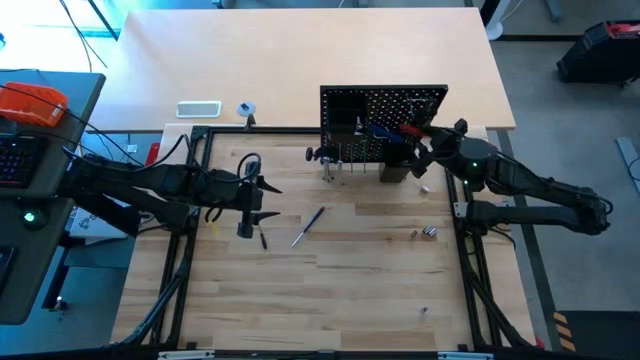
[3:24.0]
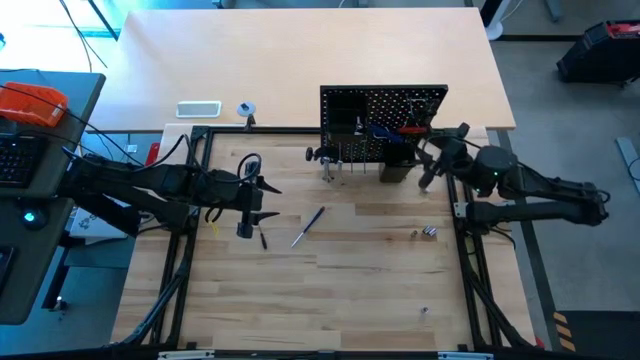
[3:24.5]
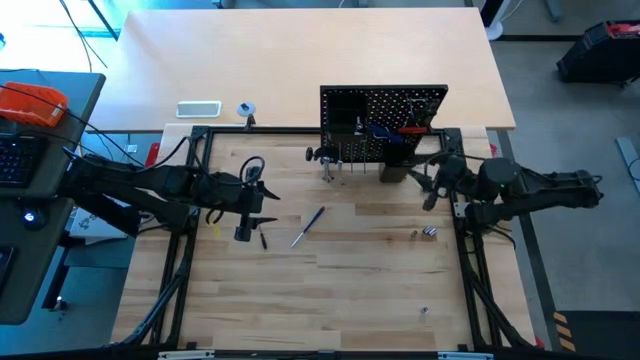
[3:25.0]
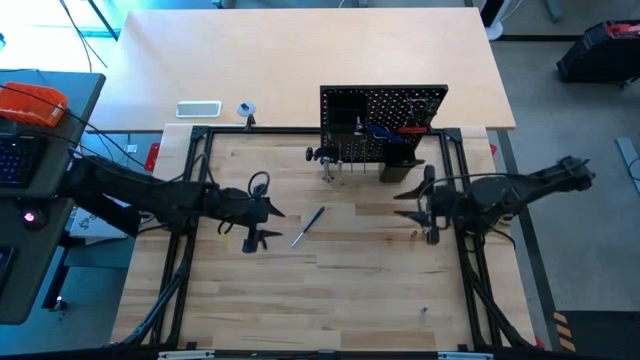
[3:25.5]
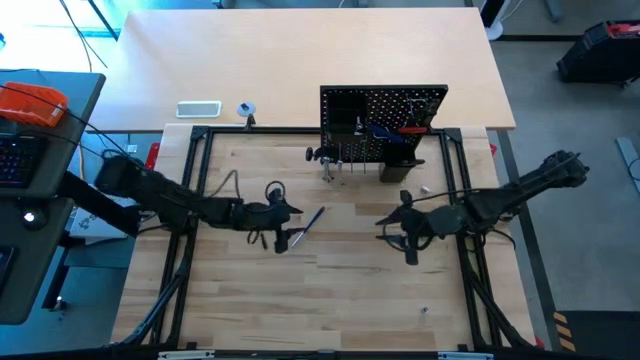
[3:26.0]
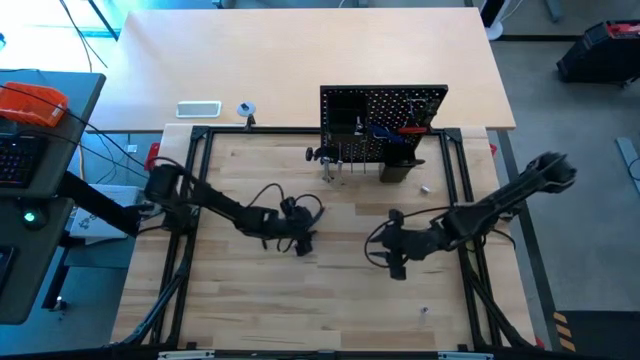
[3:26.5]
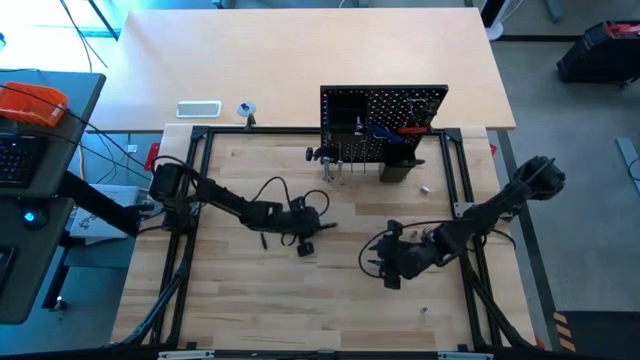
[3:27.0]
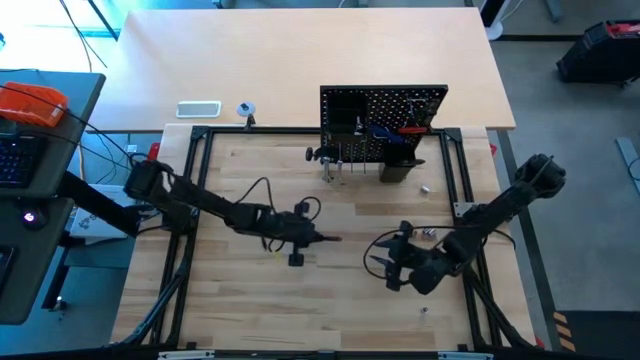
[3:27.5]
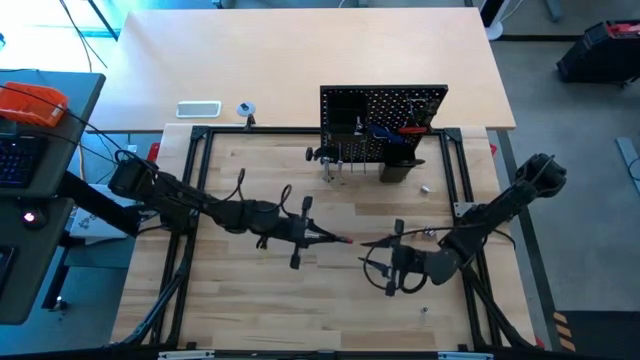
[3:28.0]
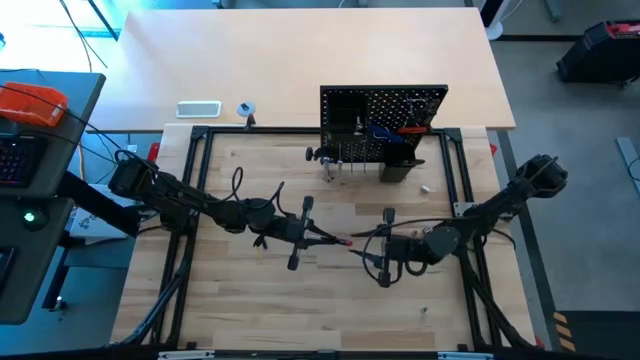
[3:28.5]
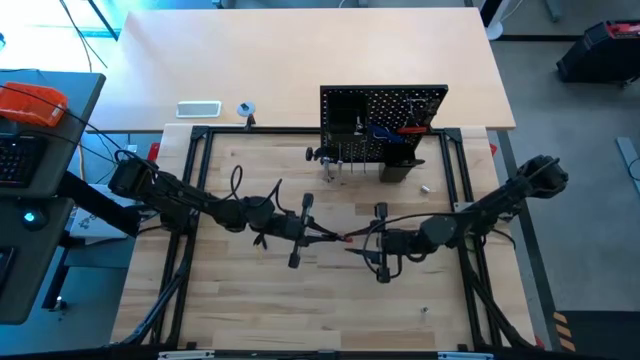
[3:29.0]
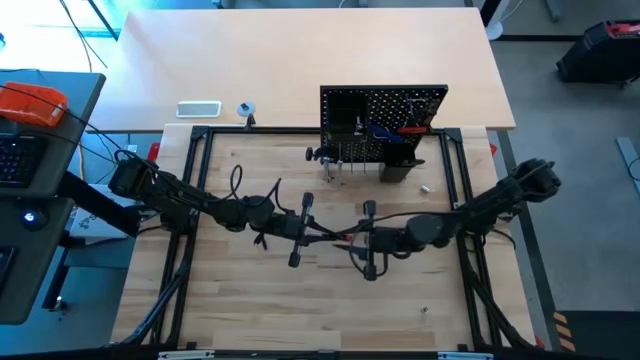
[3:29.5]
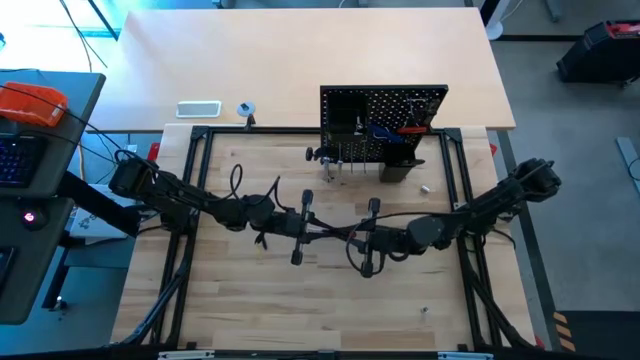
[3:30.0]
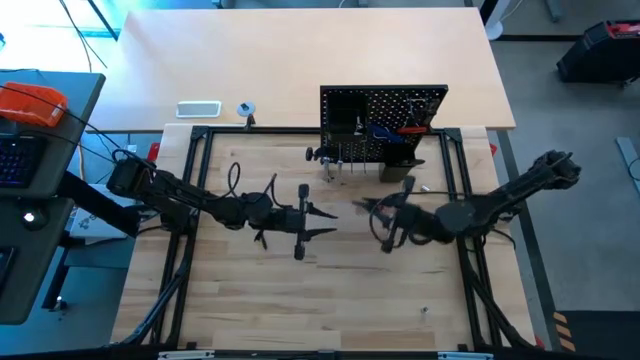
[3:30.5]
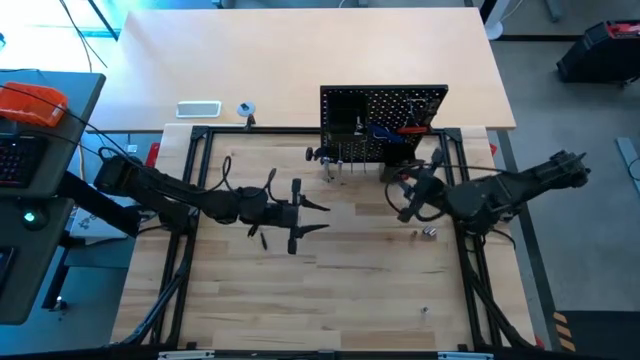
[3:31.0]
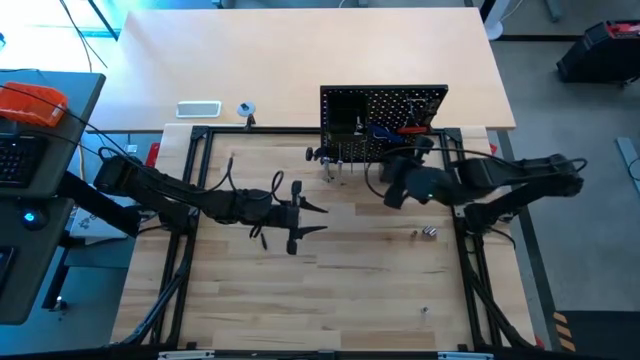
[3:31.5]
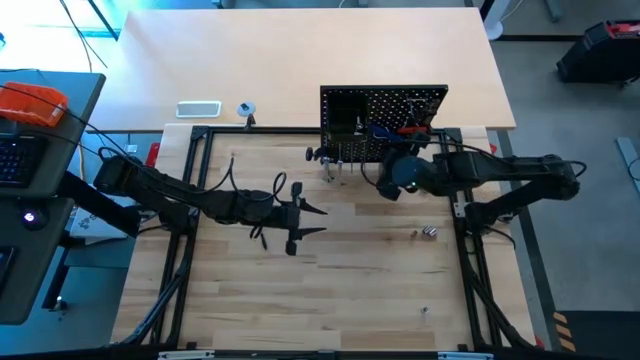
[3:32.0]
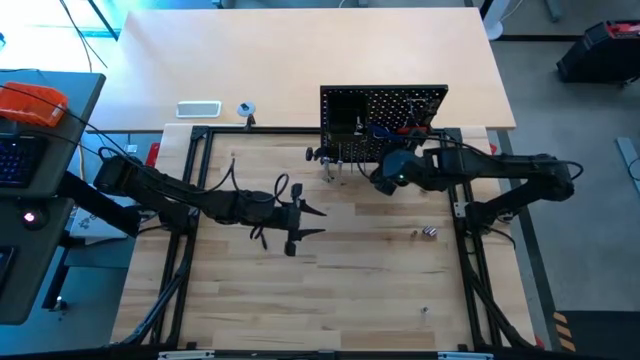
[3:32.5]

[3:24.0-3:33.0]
Task: Hang tools onto peg board
Hang the black precision screwdriver onto the pegboard

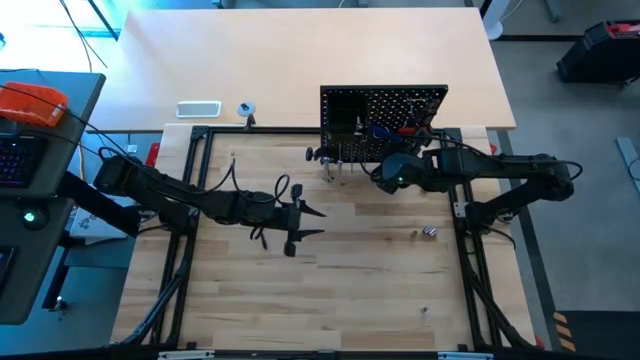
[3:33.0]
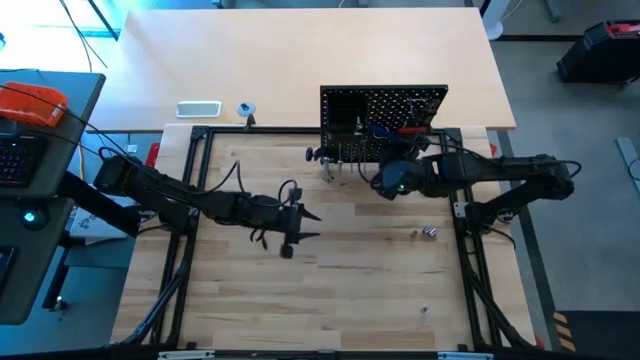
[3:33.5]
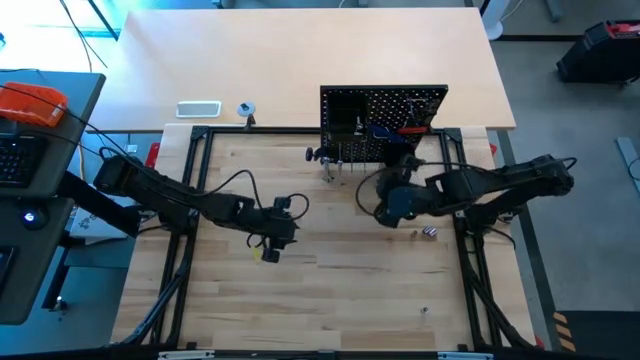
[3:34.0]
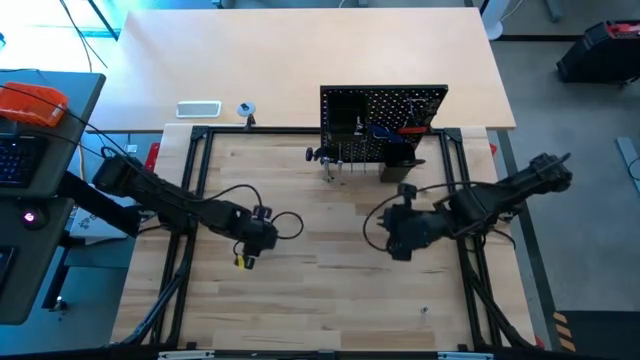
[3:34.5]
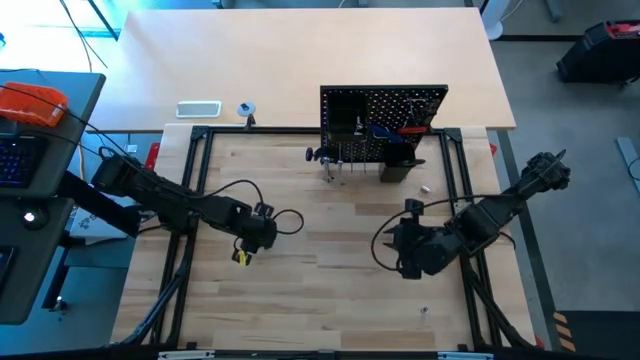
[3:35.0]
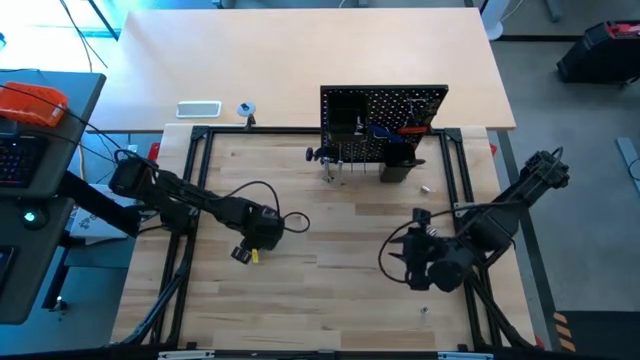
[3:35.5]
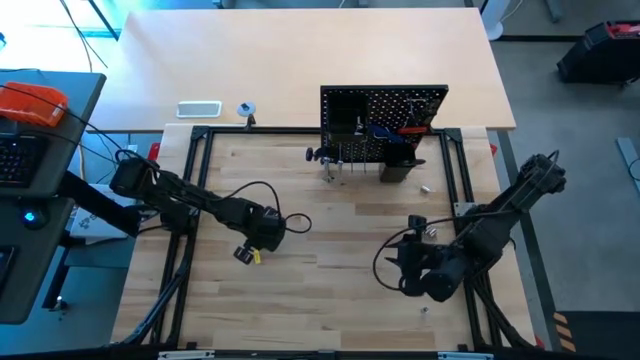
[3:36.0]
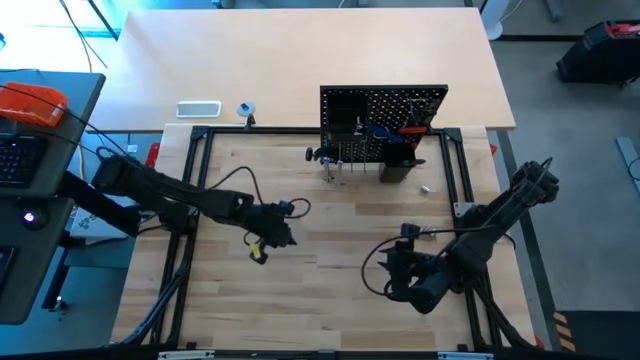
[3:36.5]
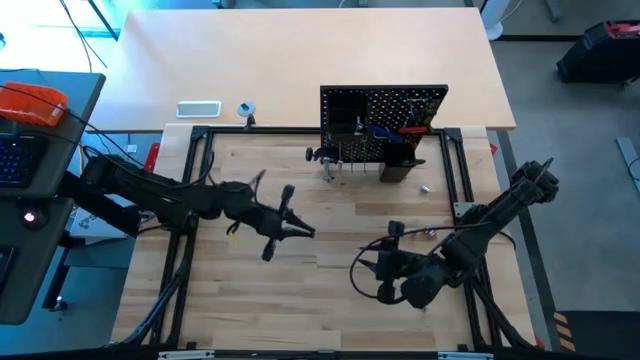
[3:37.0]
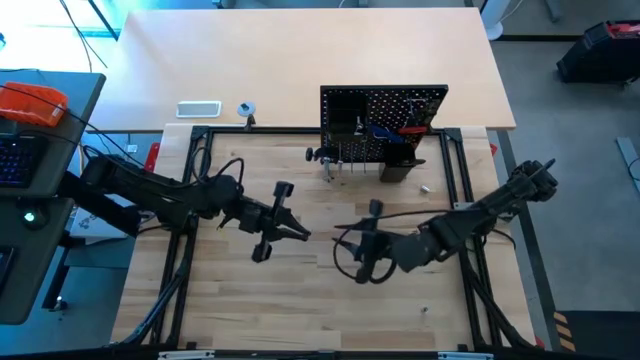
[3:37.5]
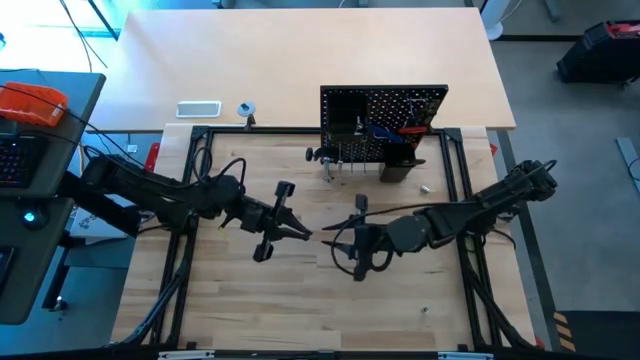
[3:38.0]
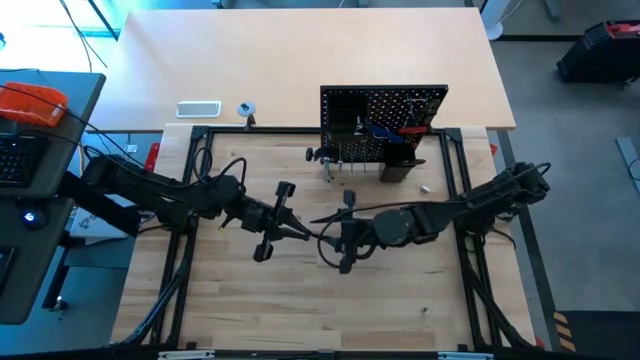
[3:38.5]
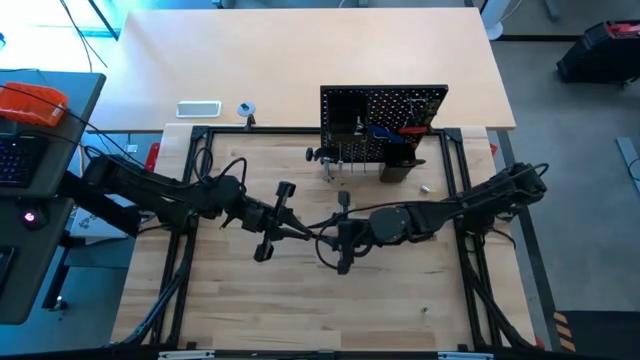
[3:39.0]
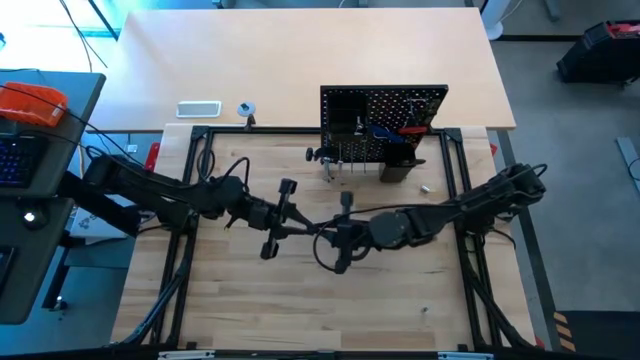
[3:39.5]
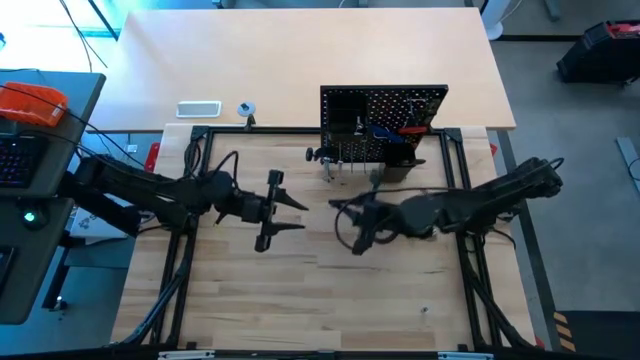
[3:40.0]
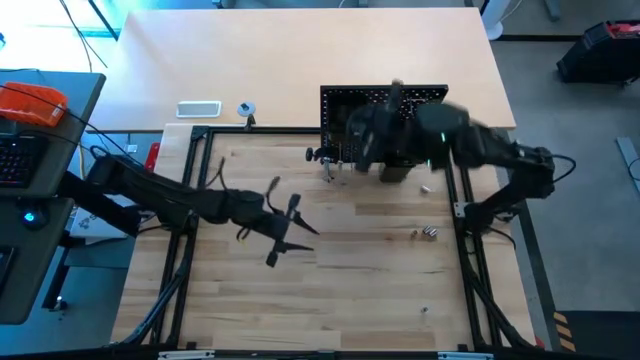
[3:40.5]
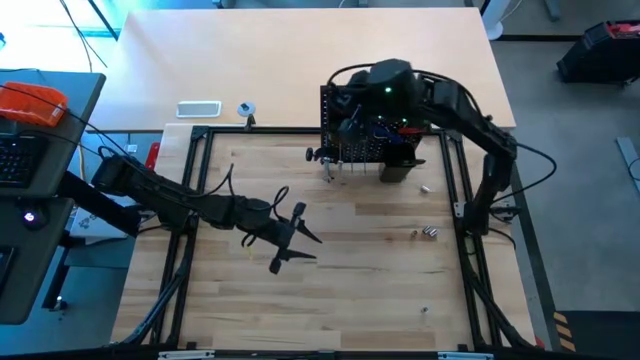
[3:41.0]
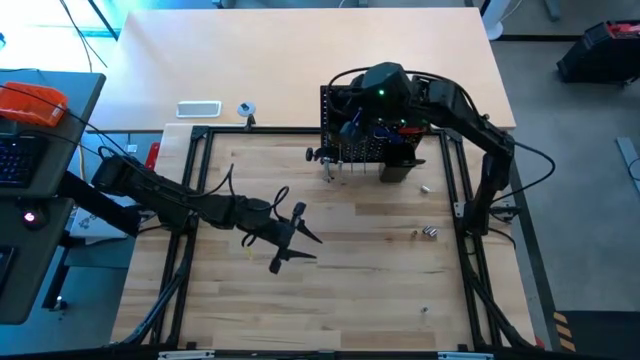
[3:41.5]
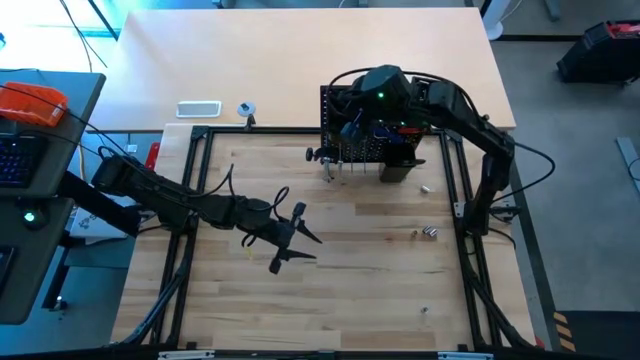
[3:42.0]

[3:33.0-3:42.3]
Hang the black precision screwdriver onto the pegboard

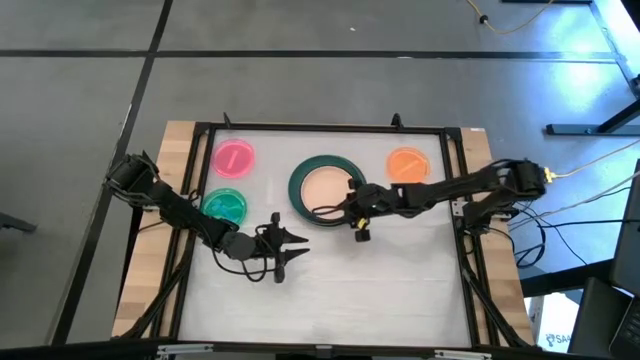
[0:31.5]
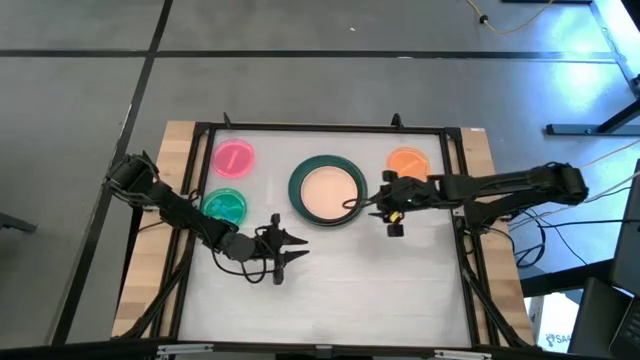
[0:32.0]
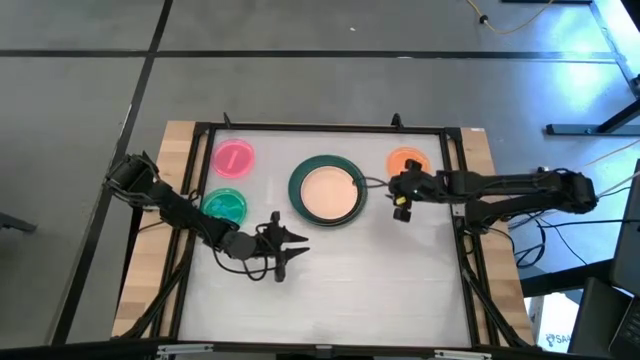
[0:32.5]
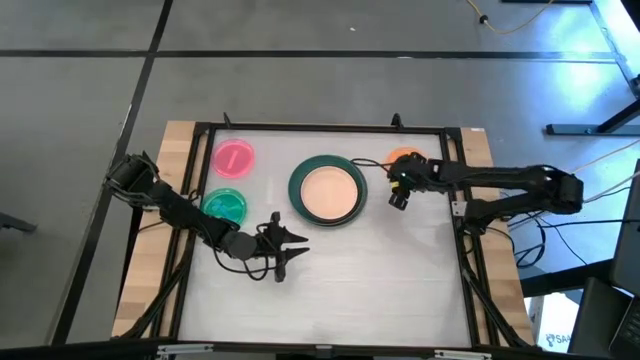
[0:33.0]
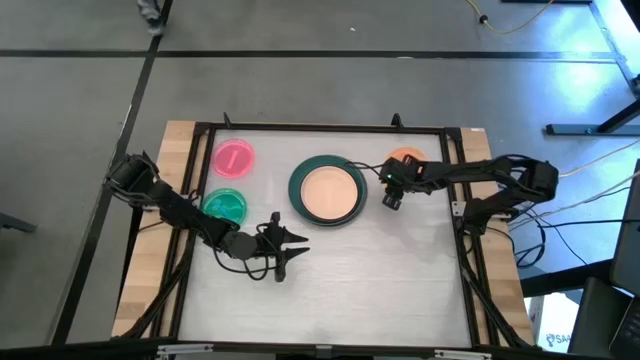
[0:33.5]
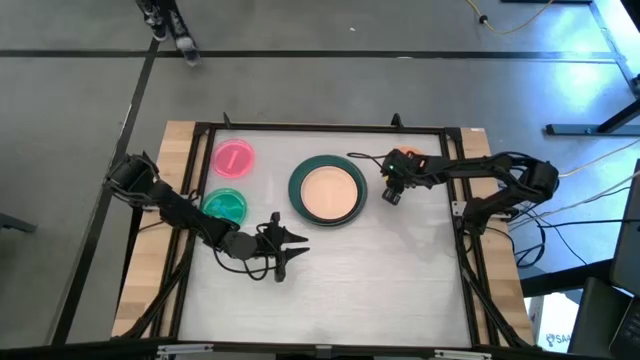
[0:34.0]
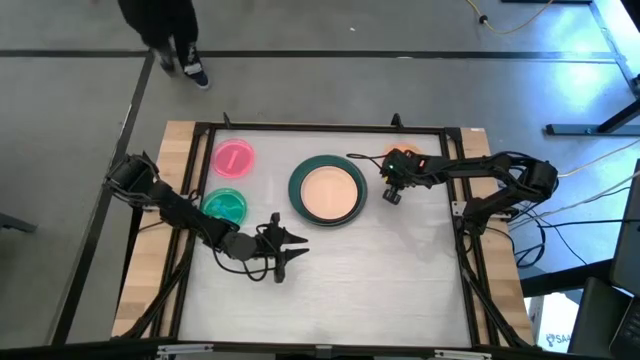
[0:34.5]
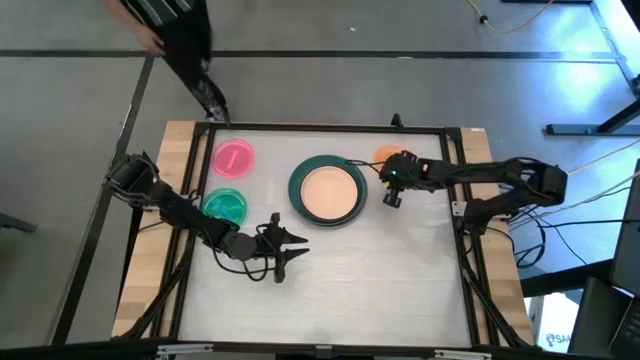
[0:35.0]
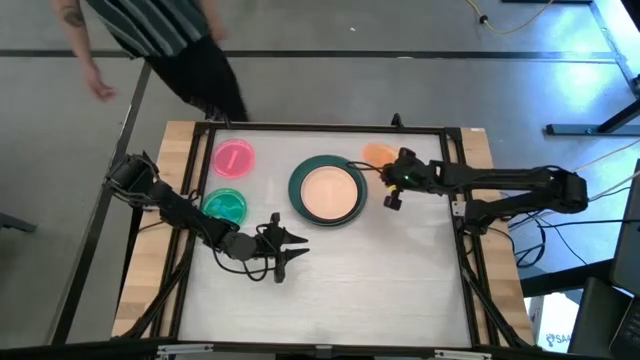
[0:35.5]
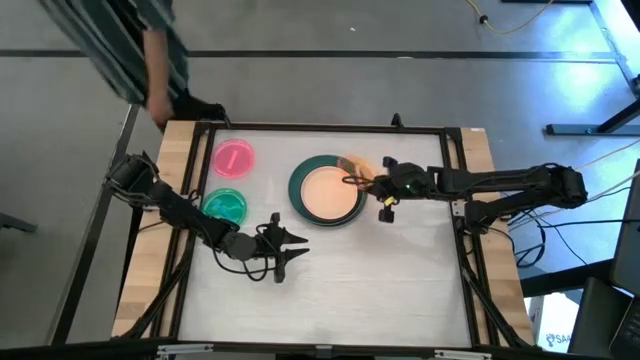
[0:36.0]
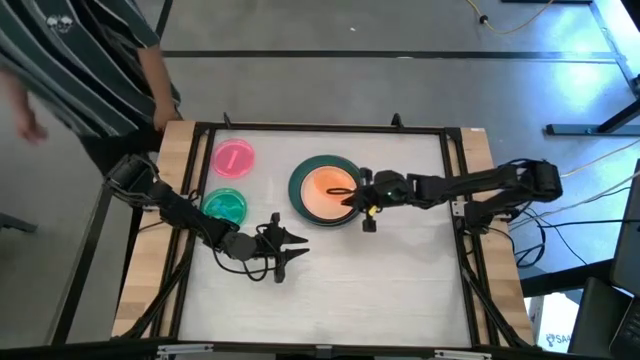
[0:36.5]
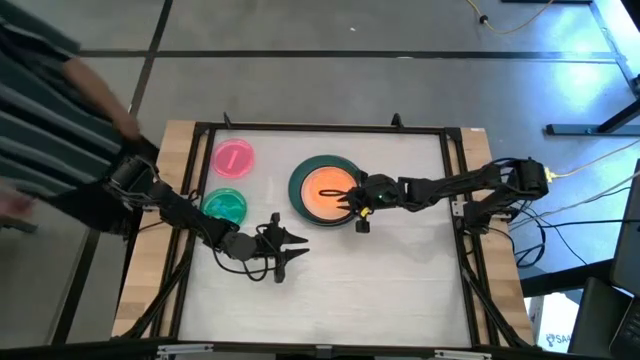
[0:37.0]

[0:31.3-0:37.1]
Task: Stack plastic plates
Stack the light orange plate on the orange plate
